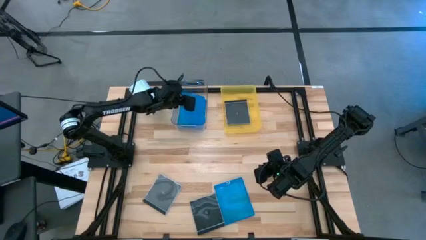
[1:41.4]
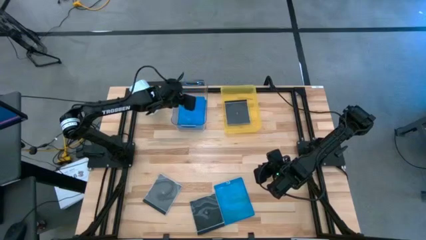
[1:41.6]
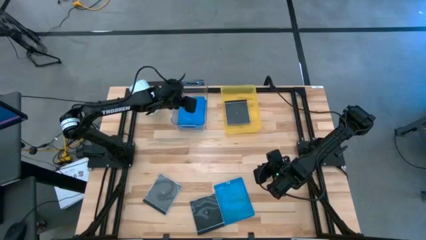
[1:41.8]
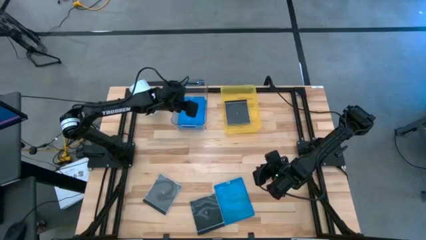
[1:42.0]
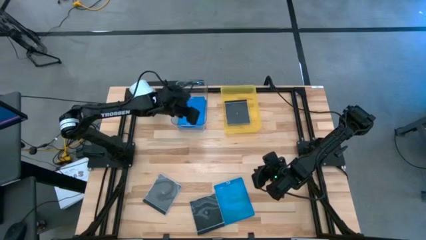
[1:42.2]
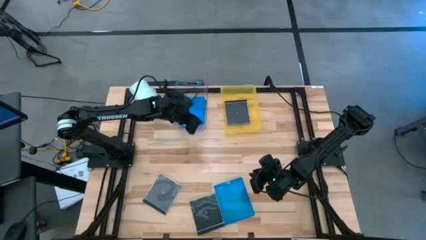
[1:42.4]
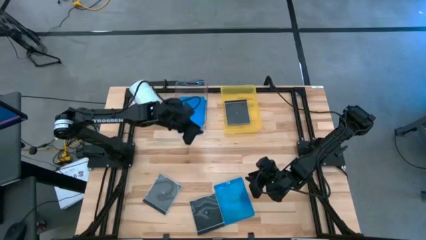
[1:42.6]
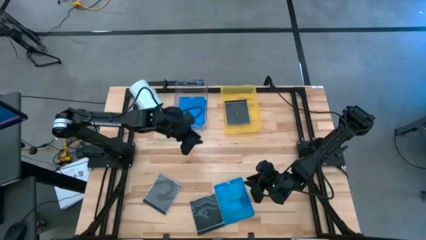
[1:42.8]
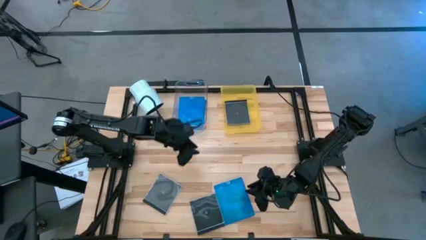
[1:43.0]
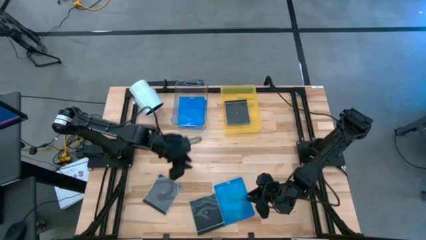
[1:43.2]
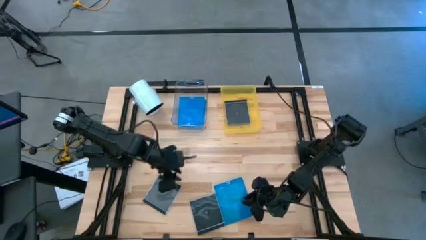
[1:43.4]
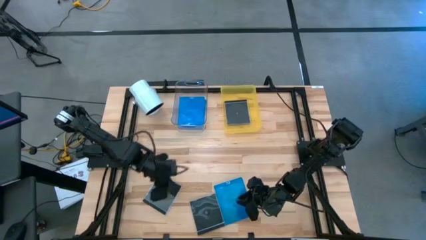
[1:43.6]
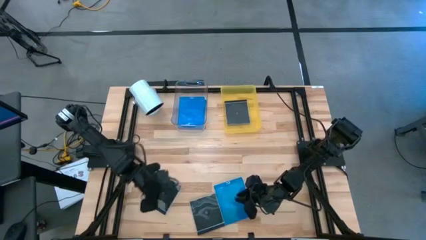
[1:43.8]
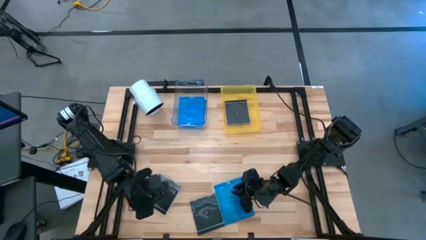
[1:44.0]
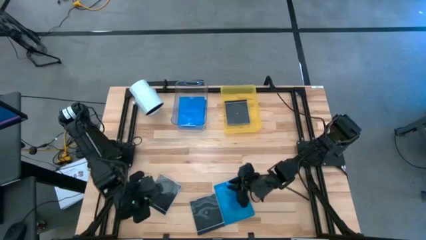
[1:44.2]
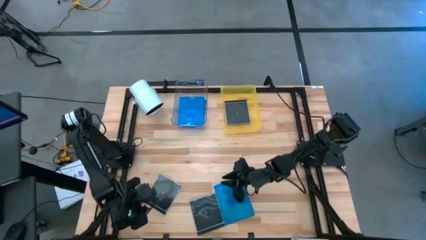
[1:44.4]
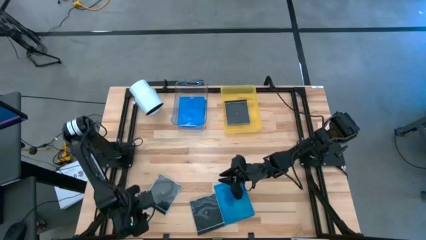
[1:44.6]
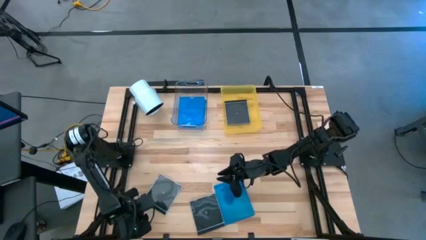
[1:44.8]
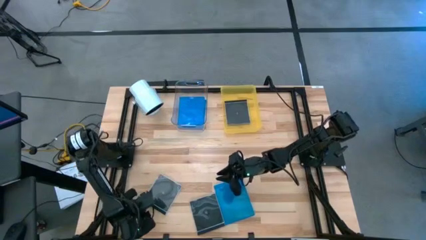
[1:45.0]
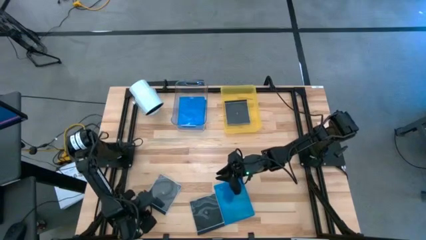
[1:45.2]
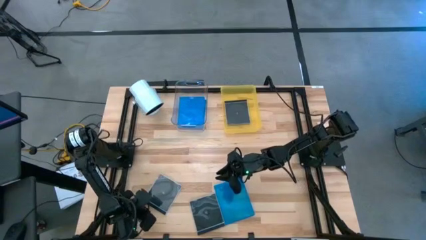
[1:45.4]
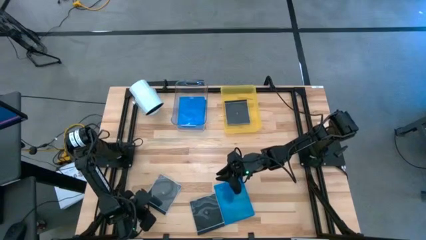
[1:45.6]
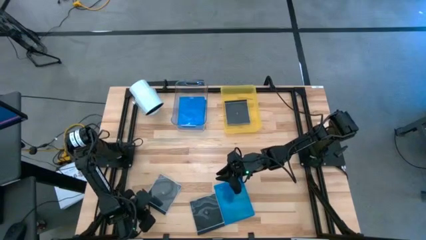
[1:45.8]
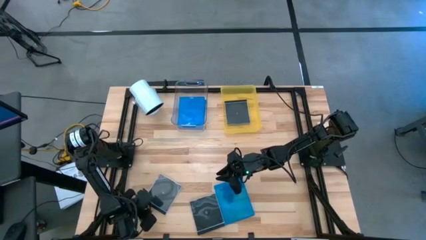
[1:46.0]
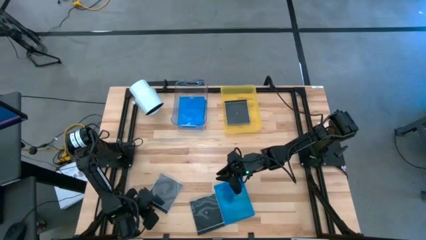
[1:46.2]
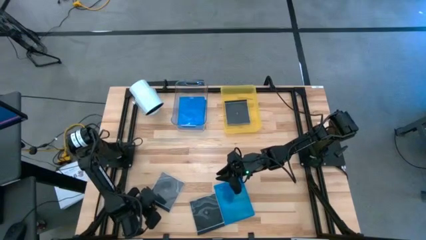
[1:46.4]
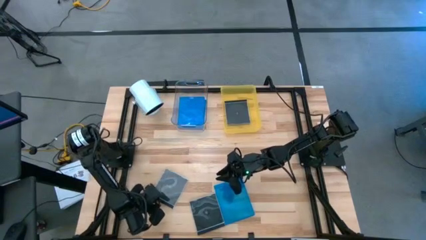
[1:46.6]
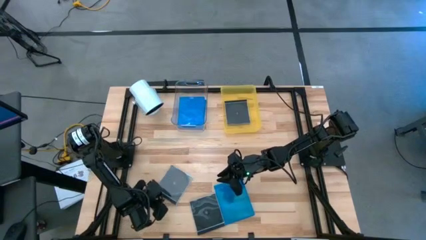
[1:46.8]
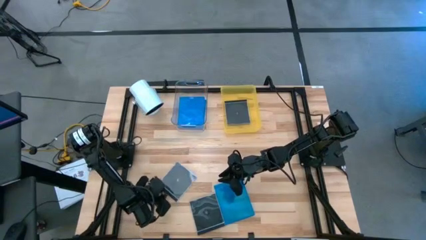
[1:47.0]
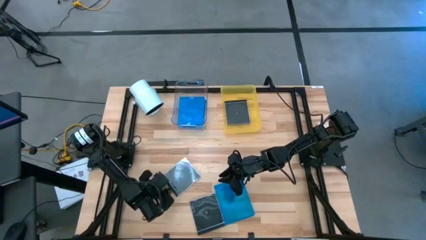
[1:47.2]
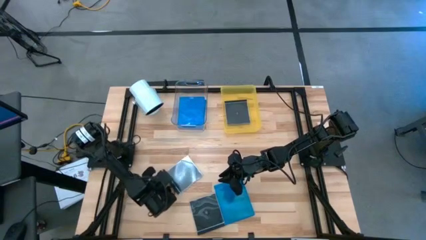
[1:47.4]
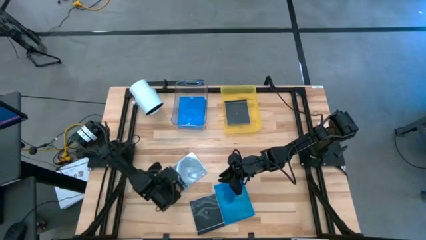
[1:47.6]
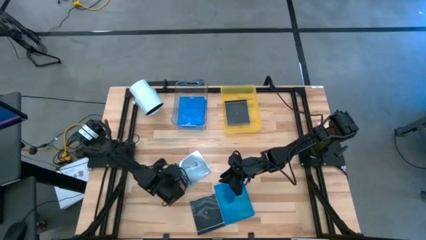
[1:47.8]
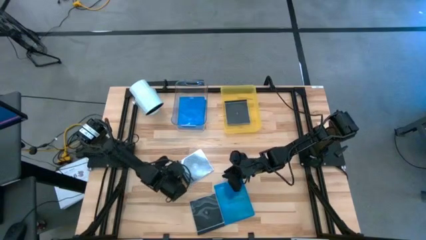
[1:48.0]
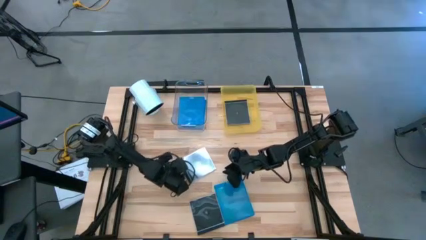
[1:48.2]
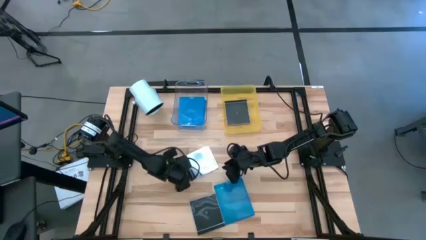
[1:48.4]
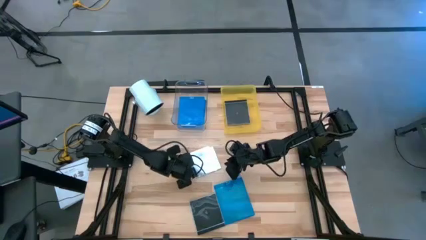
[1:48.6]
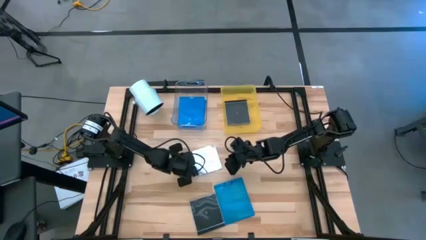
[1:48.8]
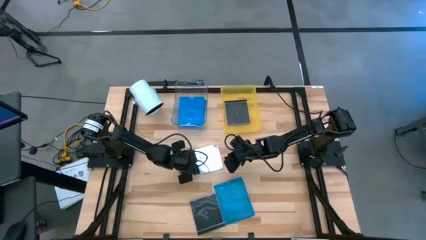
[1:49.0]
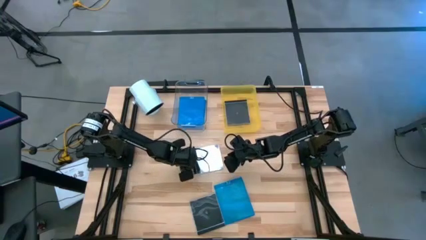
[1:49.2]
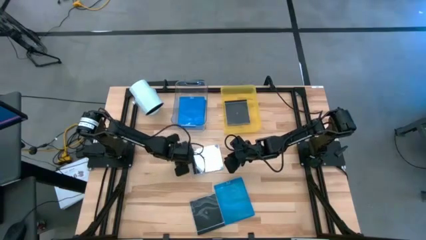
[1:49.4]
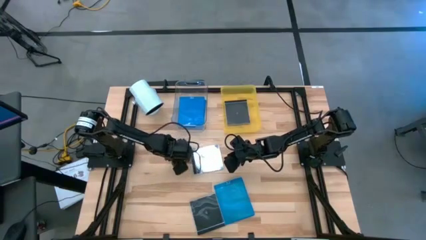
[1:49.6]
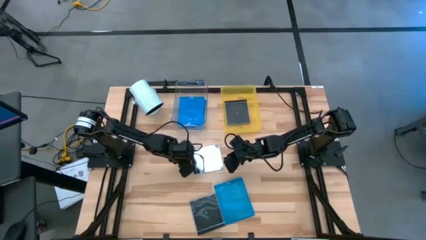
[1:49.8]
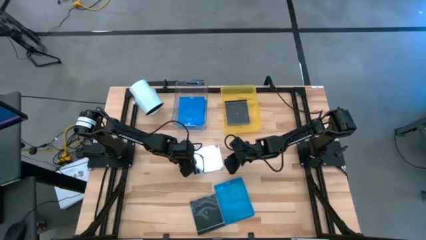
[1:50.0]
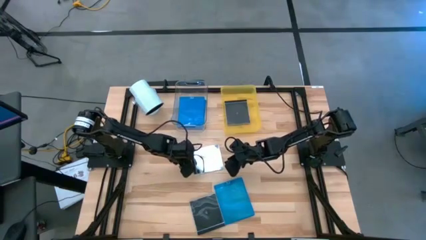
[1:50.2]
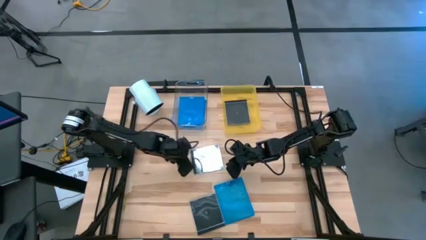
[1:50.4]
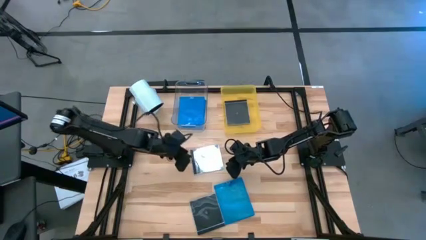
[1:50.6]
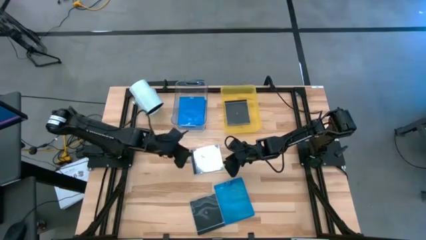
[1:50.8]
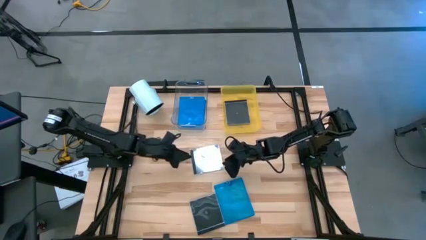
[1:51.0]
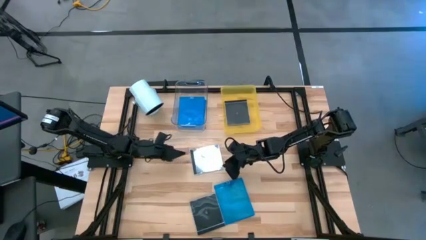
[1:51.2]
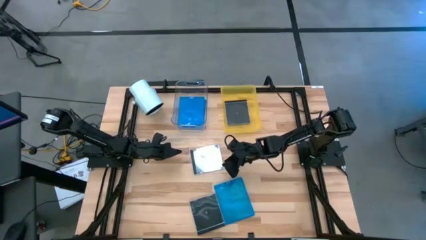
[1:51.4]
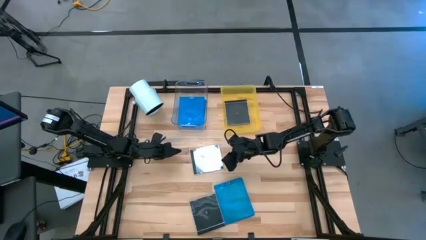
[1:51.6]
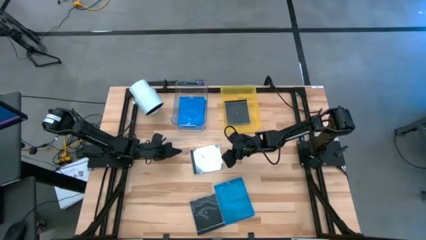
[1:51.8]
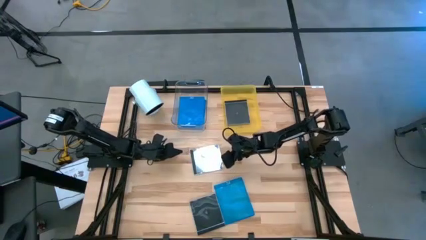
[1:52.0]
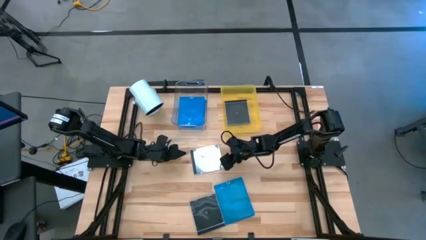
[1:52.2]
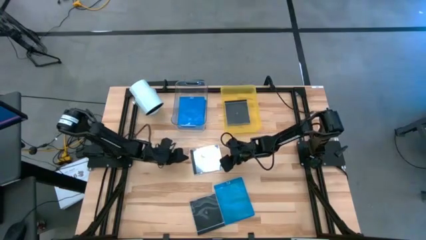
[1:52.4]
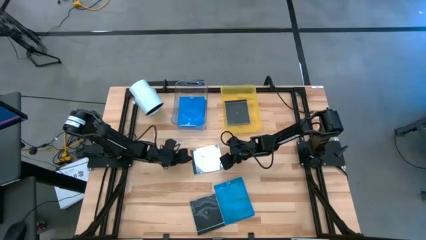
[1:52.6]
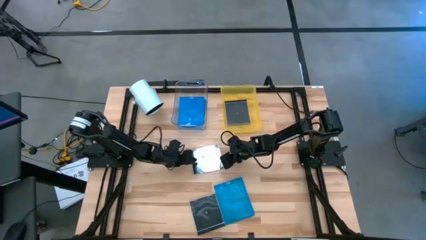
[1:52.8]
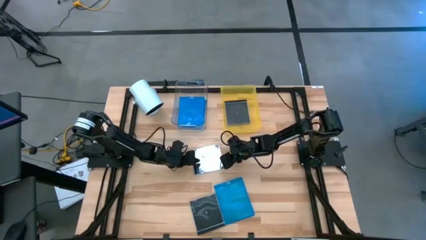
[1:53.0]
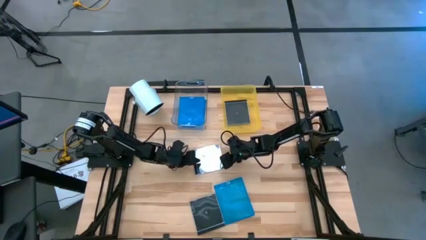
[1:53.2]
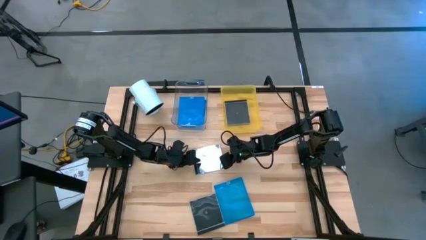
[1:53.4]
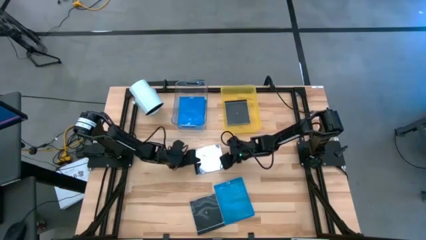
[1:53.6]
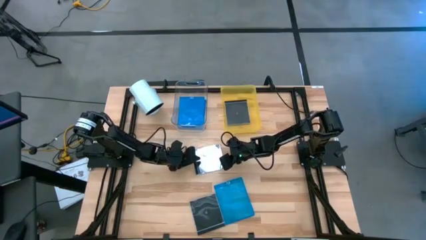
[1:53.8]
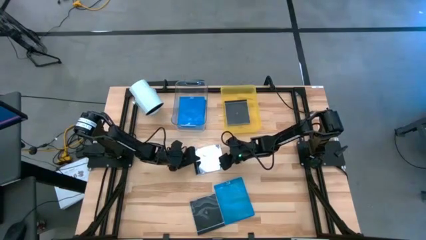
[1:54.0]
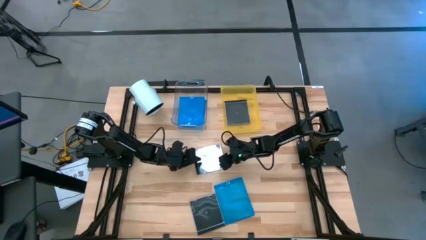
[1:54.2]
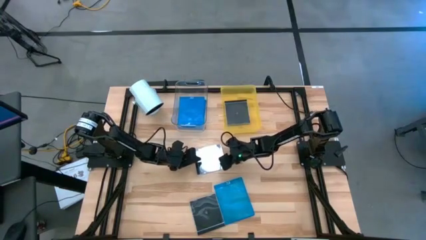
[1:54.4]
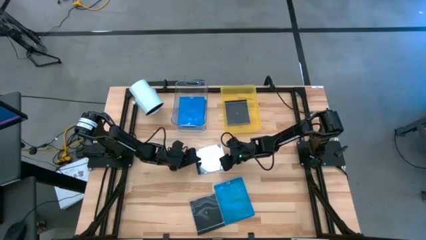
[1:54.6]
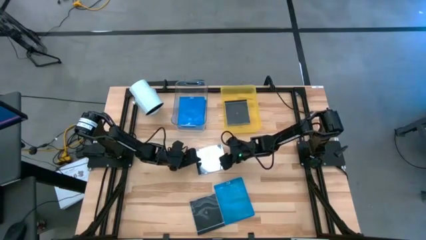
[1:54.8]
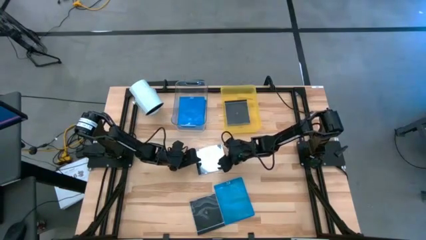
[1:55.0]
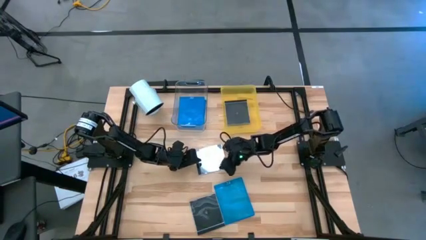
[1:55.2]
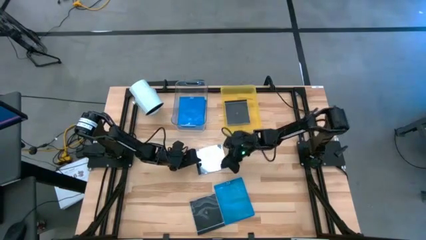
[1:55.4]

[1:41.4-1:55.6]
Task: Pick & place jewel cases by type
Put the left black CD case into the yellow bin
